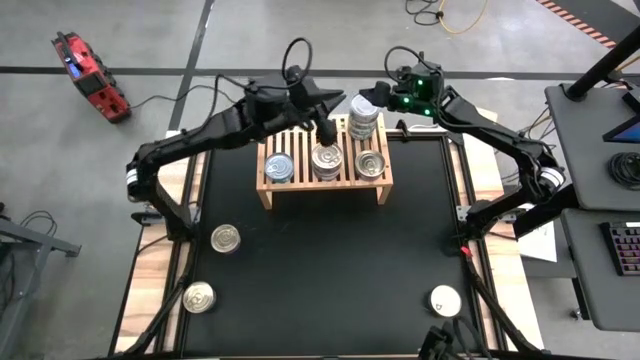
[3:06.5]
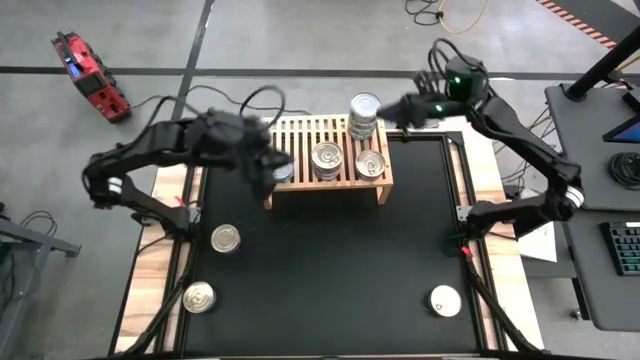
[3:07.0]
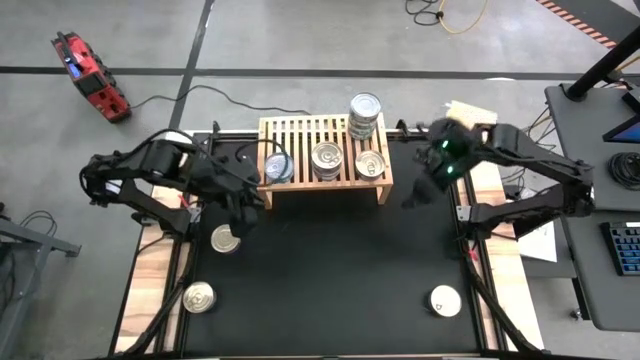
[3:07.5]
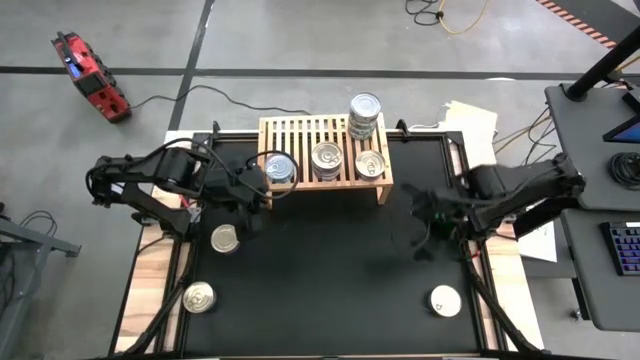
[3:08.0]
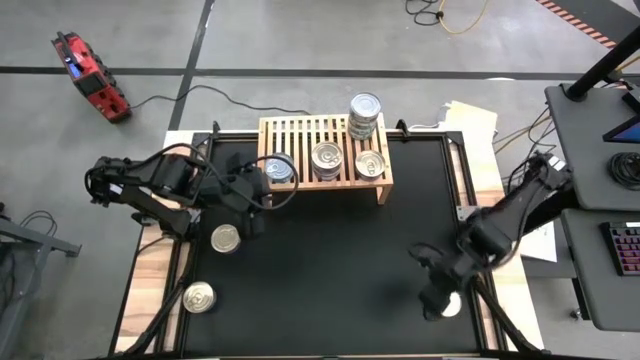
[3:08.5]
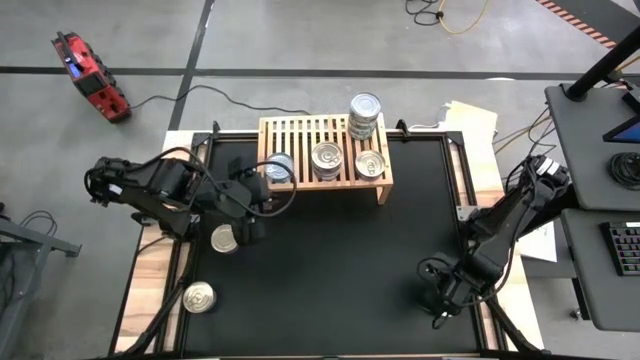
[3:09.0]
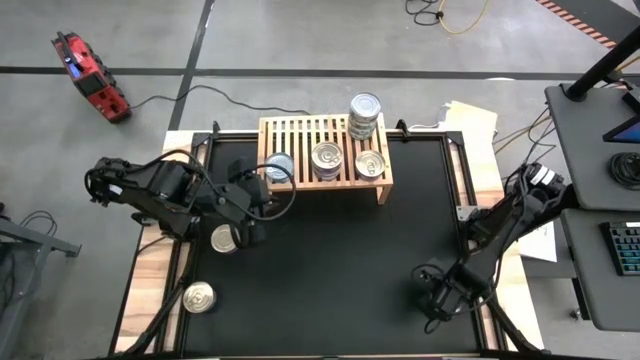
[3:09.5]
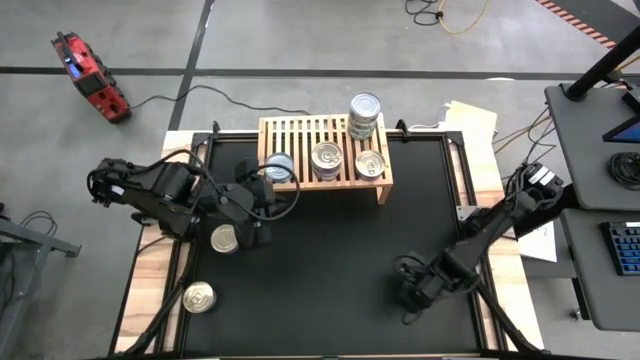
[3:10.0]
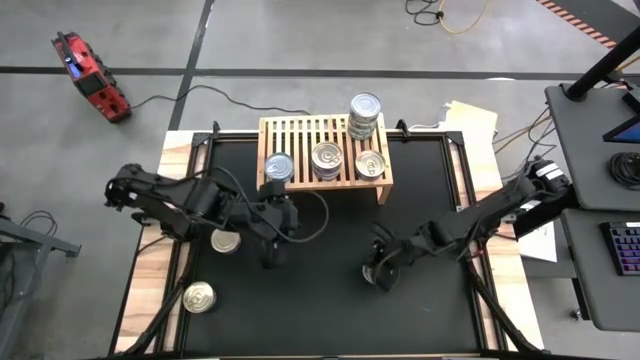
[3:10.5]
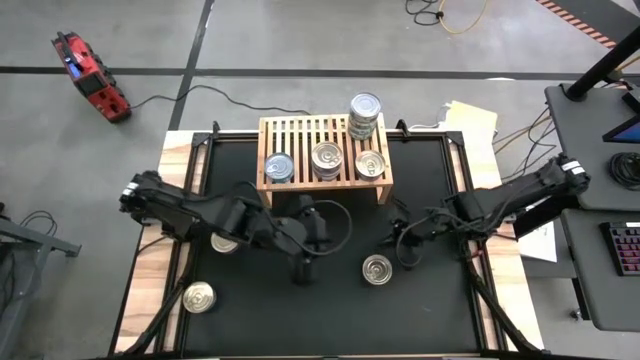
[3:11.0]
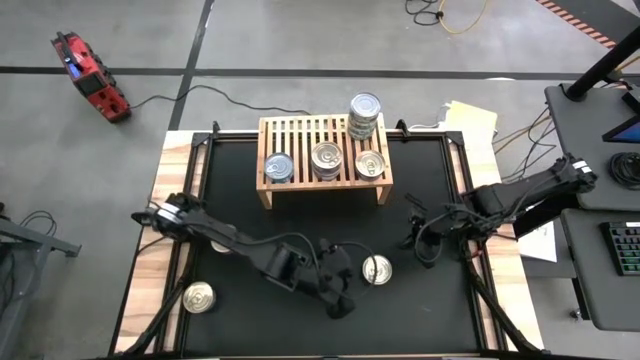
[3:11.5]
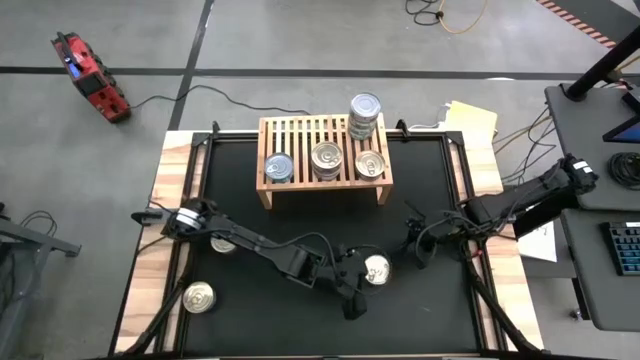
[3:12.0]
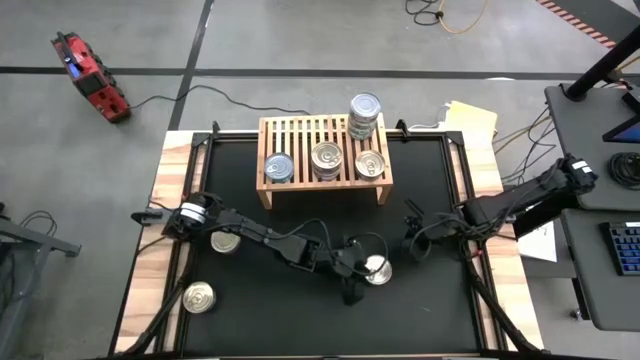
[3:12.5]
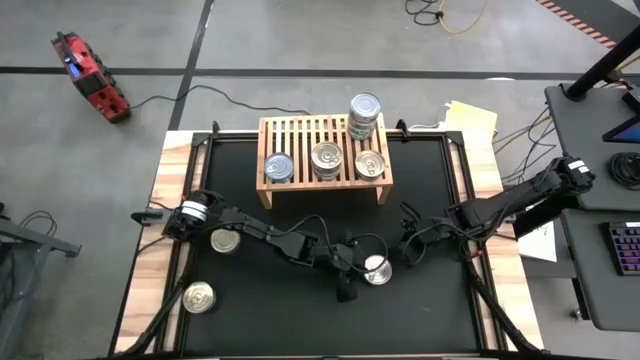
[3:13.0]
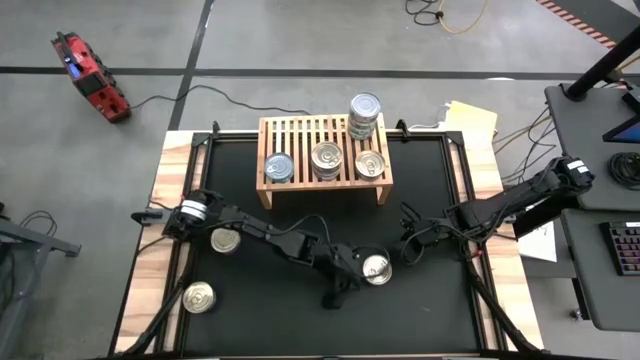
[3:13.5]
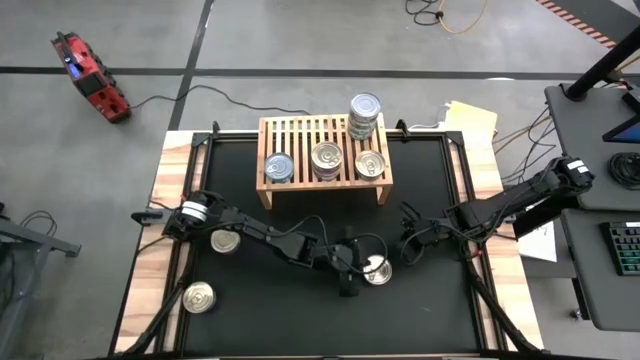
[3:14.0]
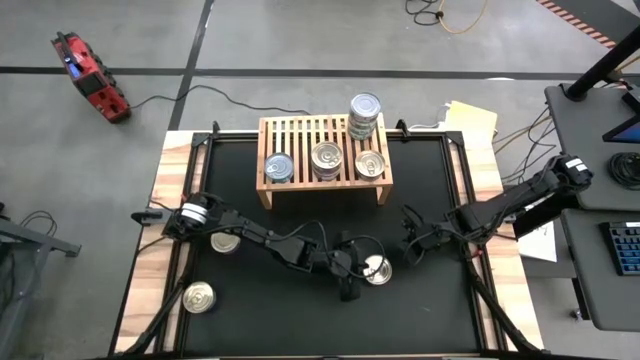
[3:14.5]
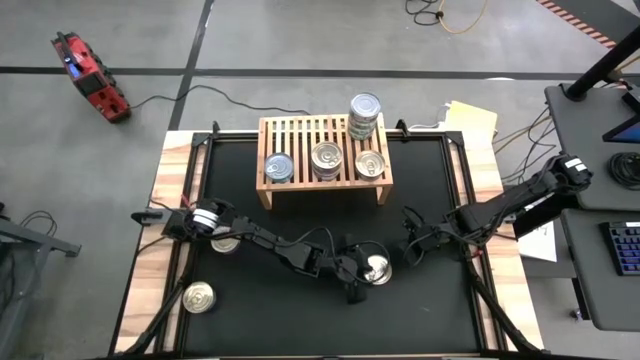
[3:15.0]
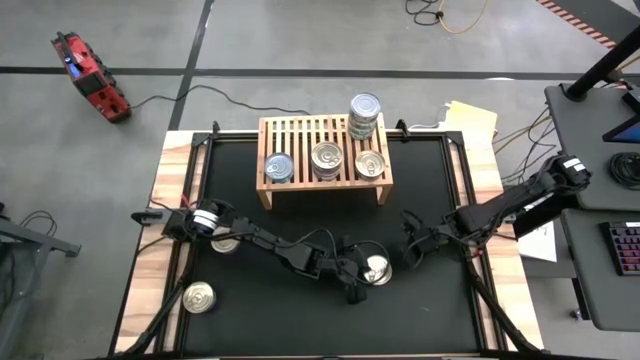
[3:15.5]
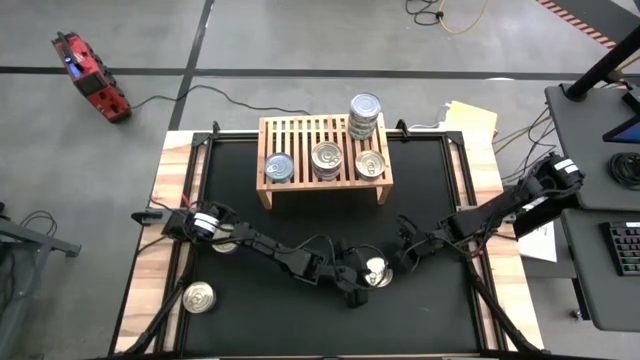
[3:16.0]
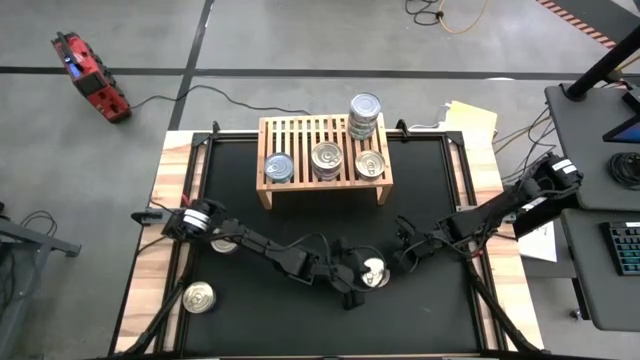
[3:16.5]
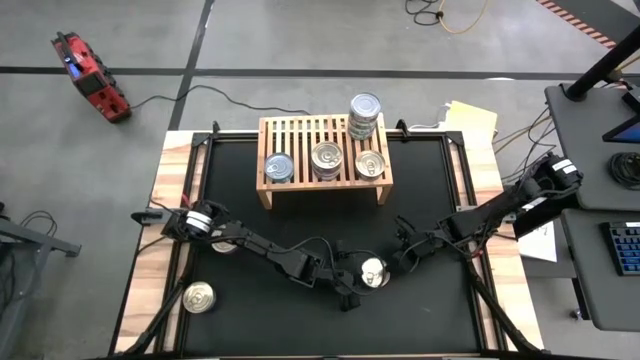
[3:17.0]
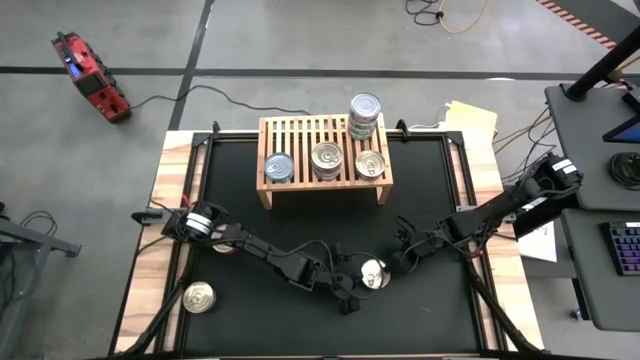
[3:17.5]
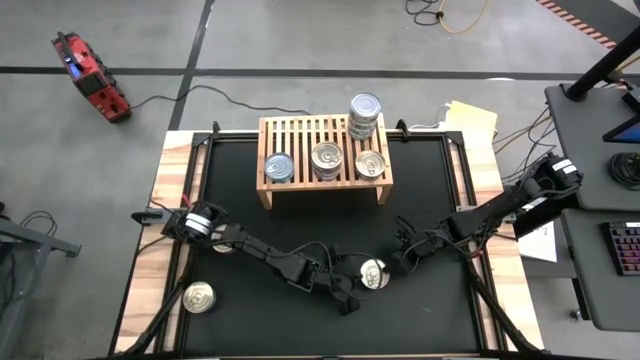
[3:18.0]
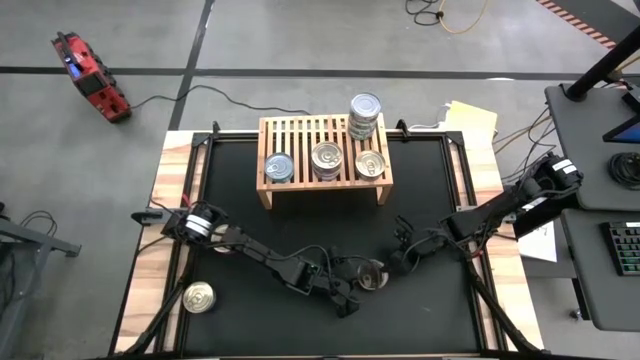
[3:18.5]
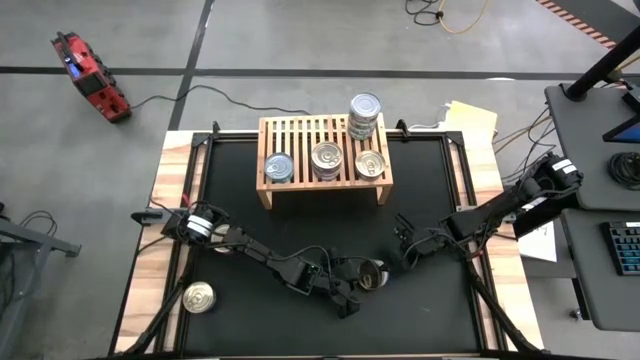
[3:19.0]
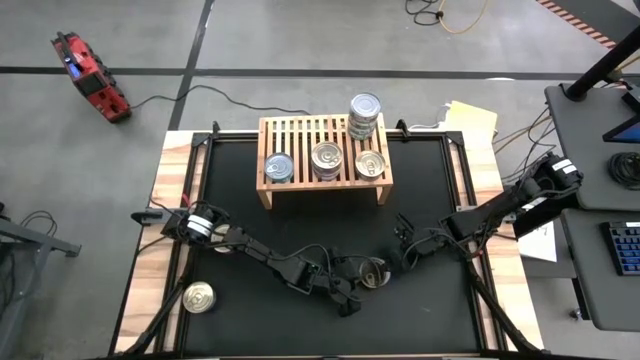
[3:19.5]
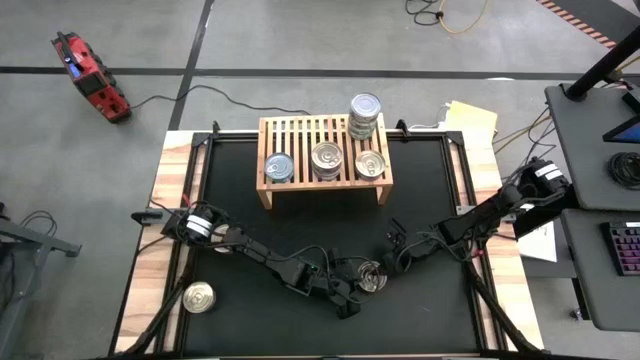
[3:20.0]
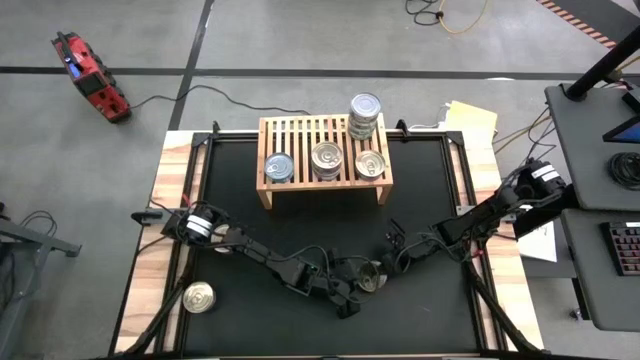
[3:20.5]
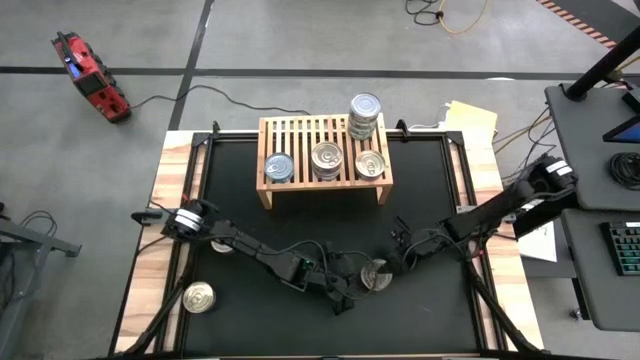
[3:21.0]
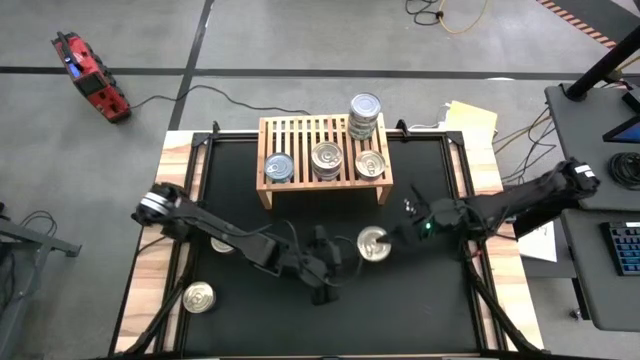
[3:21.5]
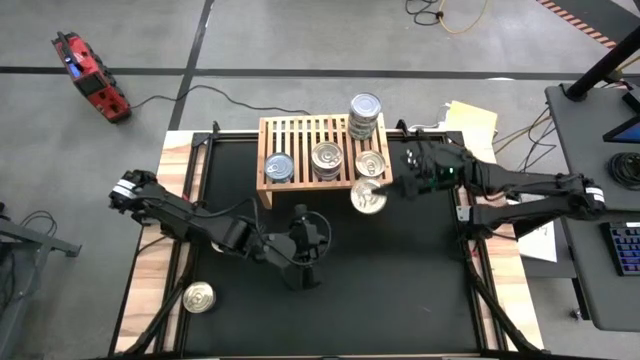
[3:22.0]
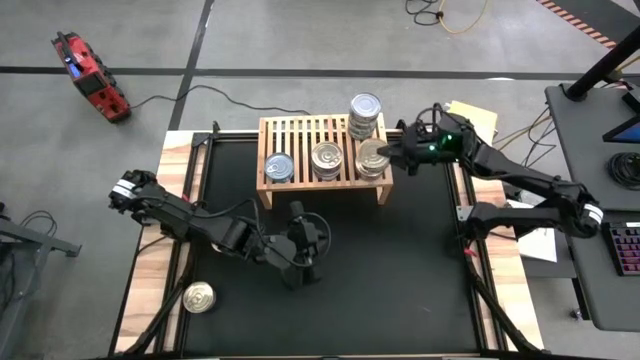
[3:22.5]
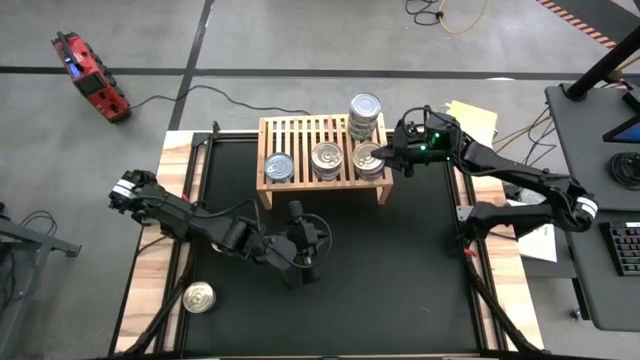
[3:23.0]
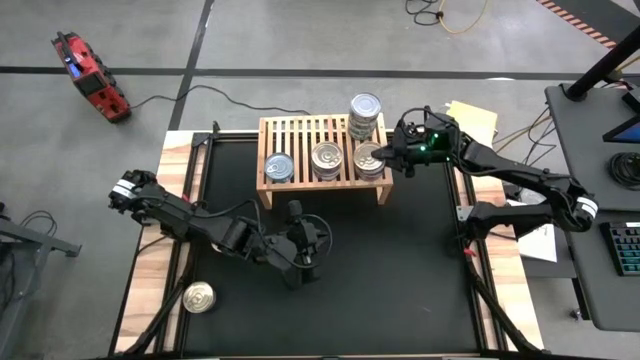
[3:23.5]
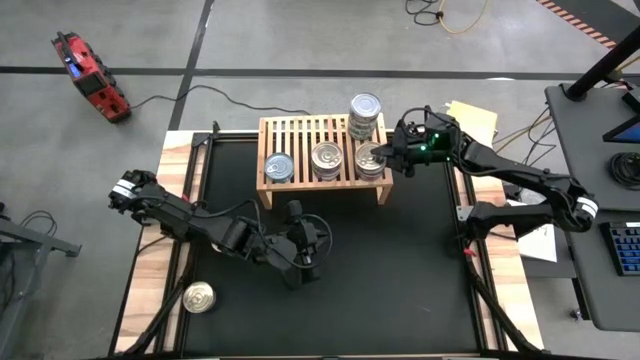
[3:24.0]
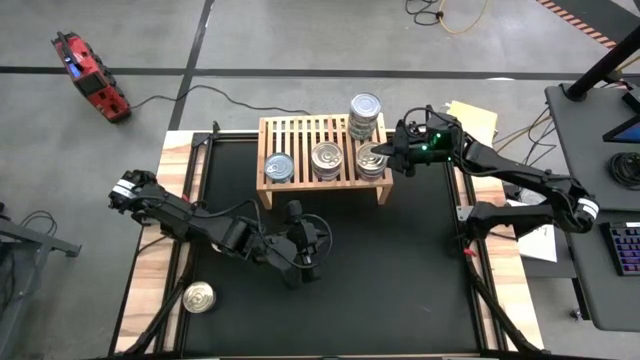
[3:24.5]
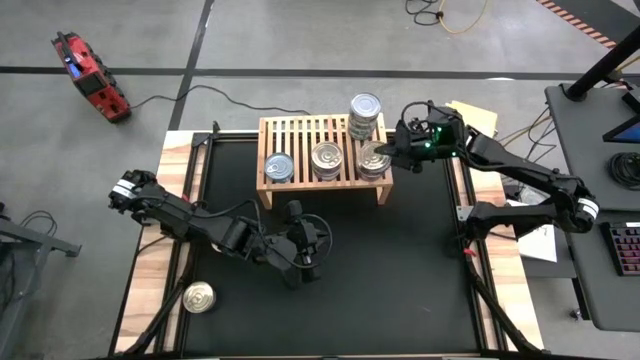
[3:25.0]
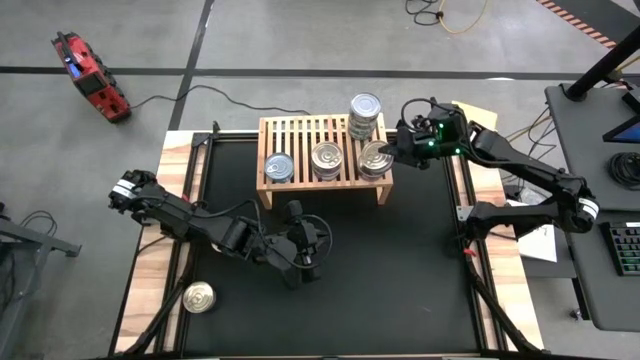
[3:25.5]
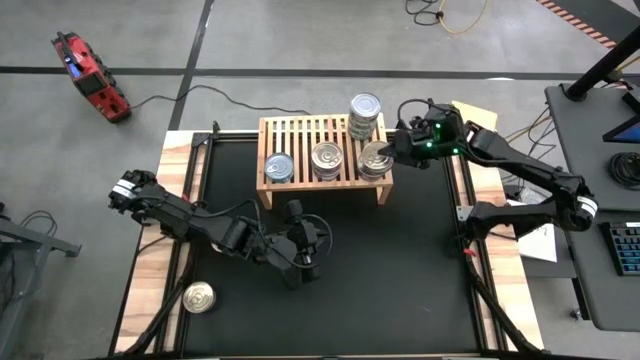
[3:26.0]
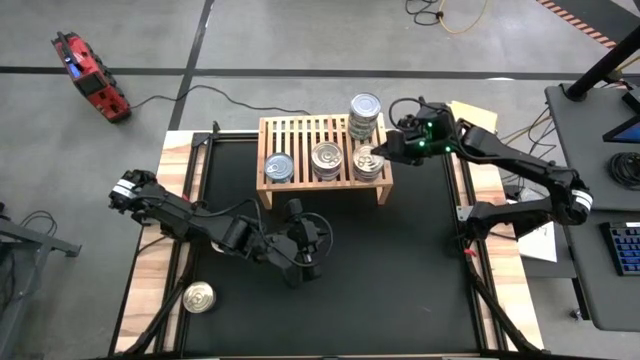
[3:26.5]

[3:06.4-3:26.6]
Task: Stack canned seafood by type on shelf
Stack the blue pink tuna can on top of the blue pink tuna can on the shelf

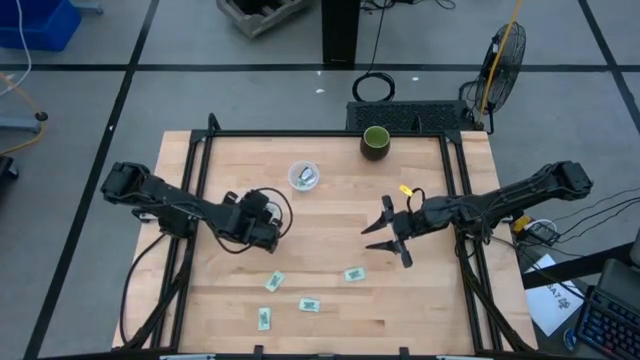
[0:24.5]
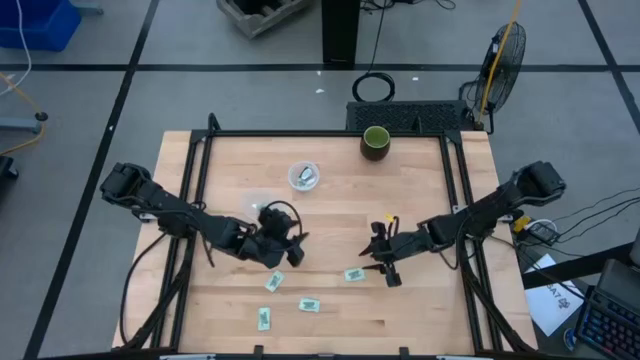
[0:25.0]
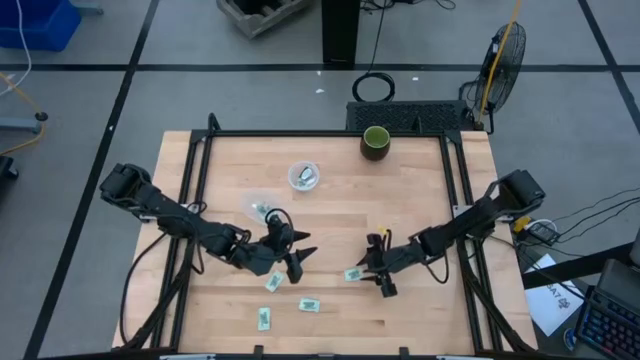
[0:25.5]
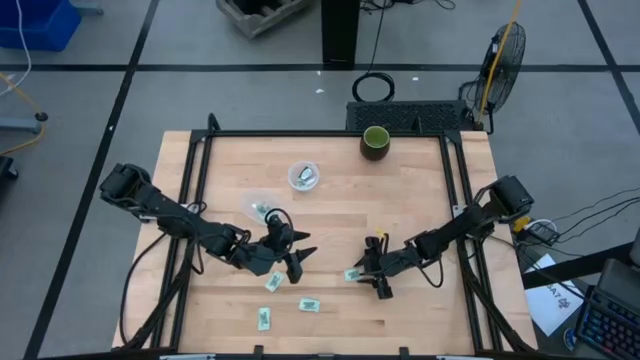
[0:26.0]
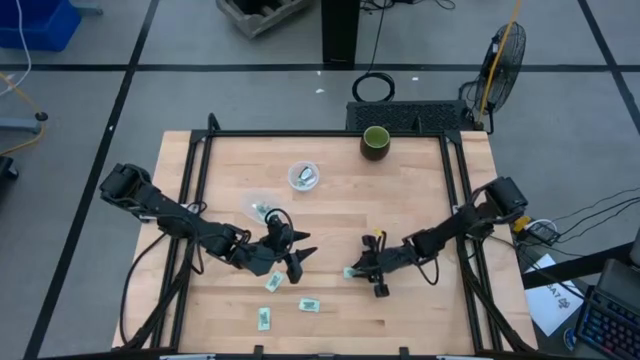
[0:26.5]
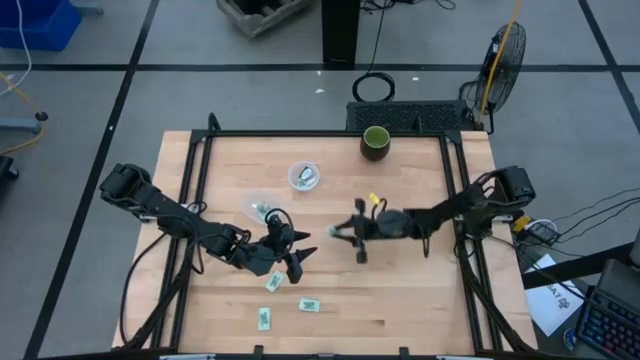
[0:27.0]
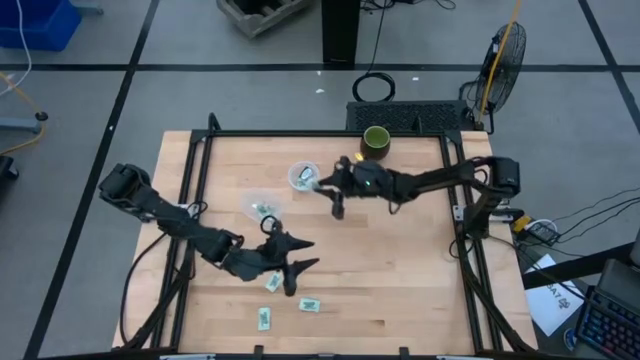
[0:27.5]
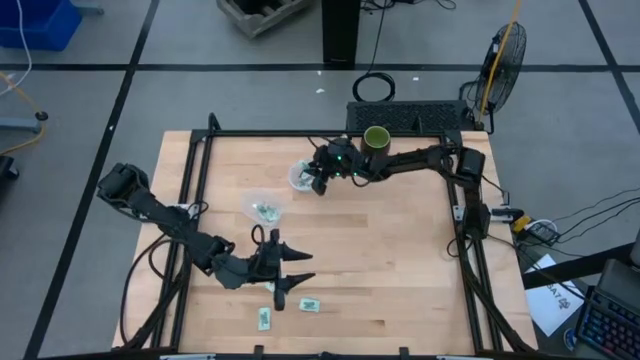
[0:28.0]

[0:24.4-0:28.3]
Task: Pick and place Stevia / Truvia into bins
Put the stevia packet into the top container
